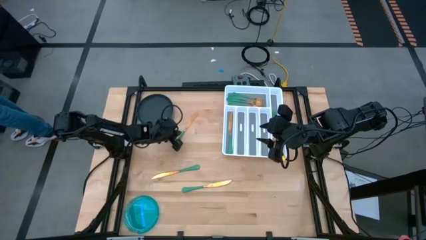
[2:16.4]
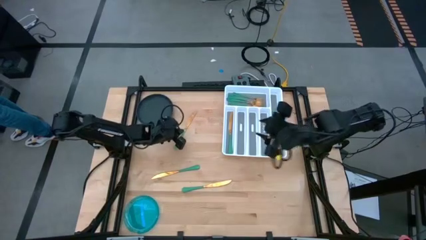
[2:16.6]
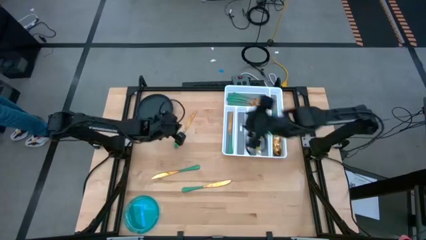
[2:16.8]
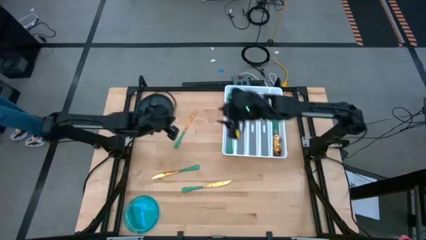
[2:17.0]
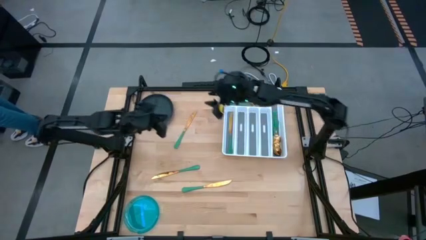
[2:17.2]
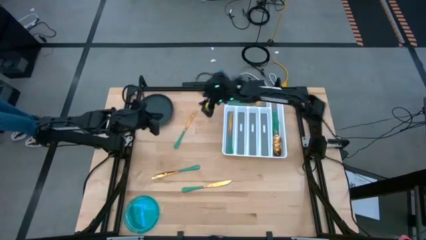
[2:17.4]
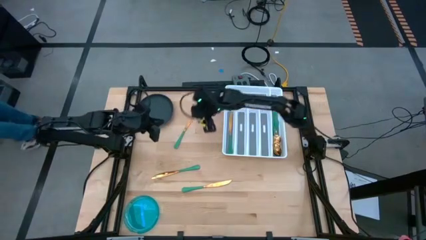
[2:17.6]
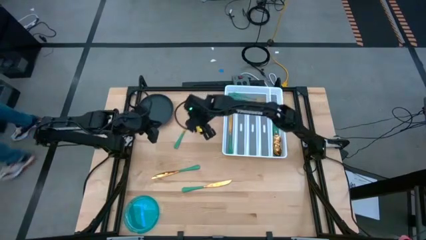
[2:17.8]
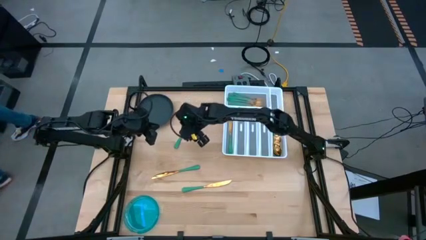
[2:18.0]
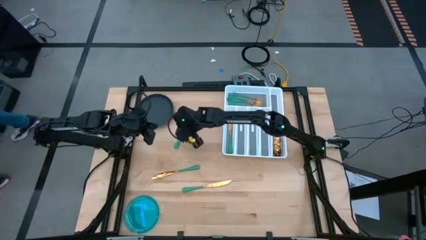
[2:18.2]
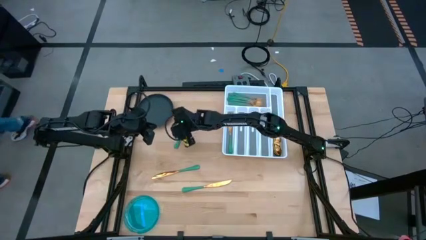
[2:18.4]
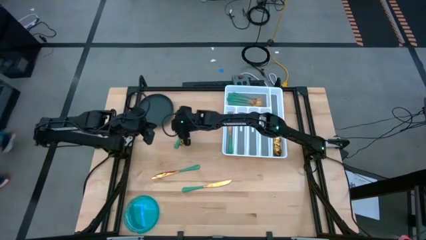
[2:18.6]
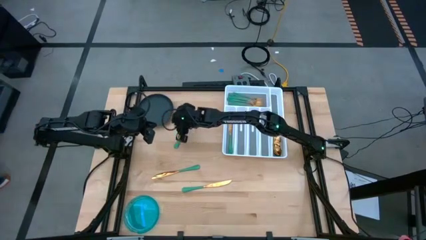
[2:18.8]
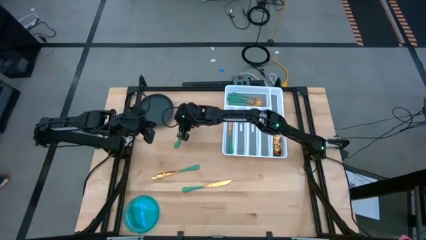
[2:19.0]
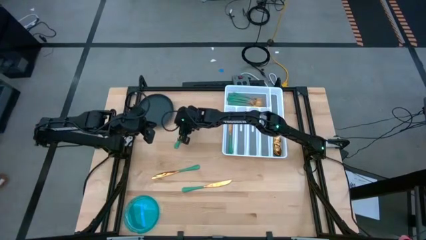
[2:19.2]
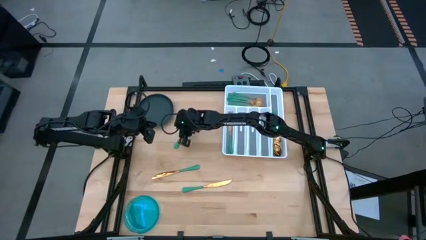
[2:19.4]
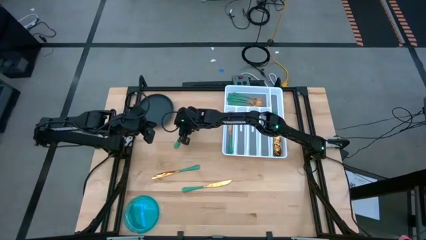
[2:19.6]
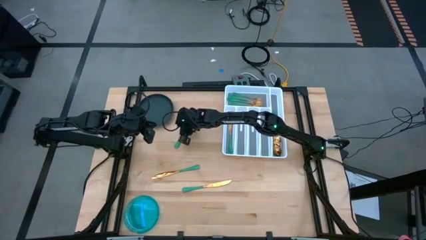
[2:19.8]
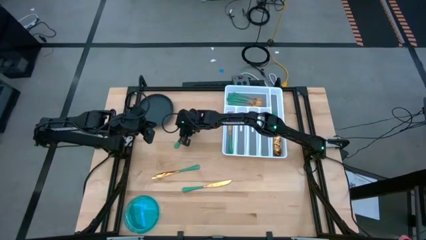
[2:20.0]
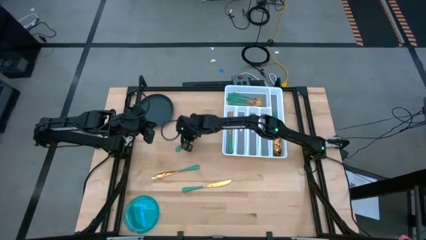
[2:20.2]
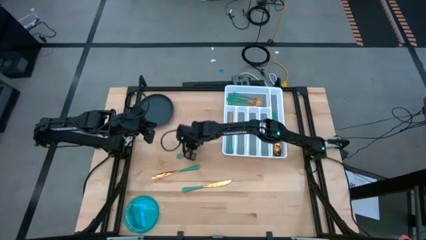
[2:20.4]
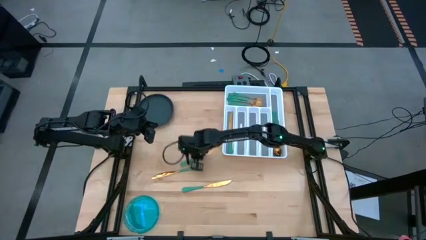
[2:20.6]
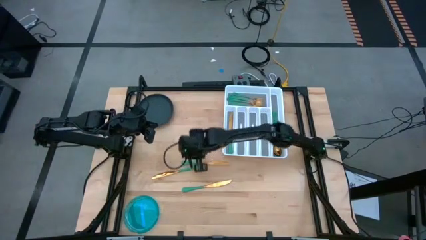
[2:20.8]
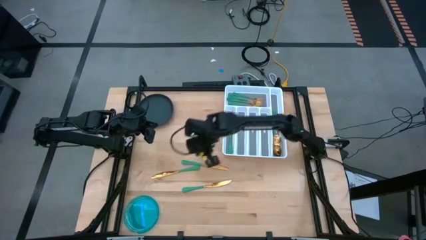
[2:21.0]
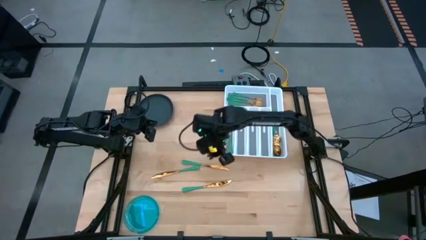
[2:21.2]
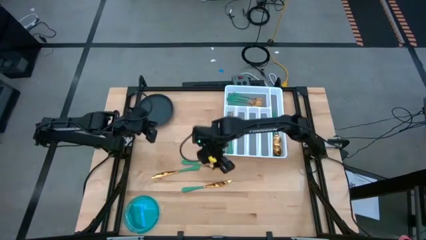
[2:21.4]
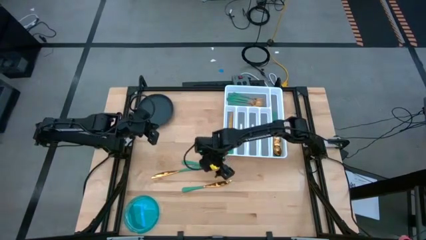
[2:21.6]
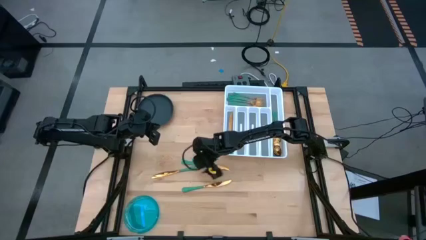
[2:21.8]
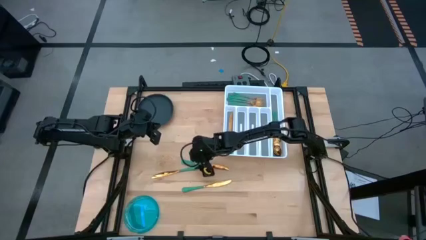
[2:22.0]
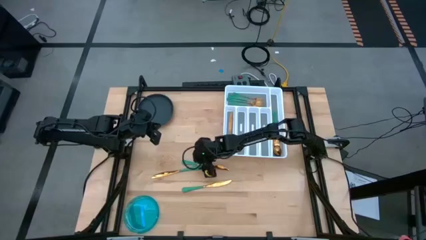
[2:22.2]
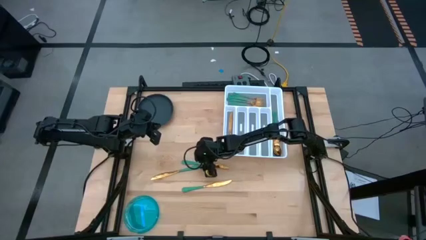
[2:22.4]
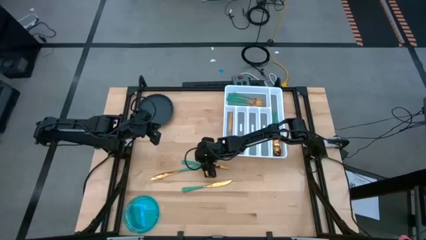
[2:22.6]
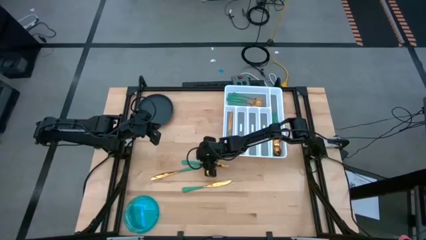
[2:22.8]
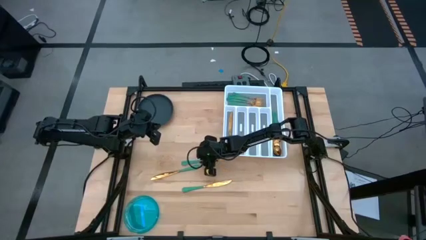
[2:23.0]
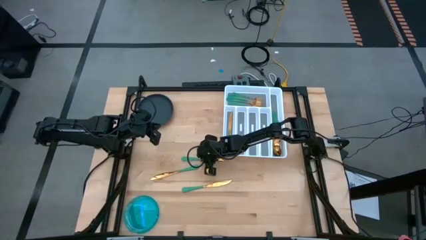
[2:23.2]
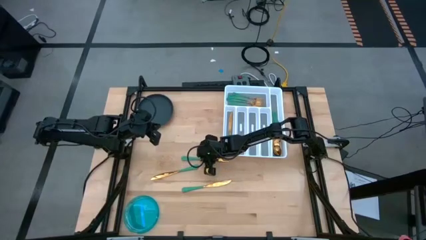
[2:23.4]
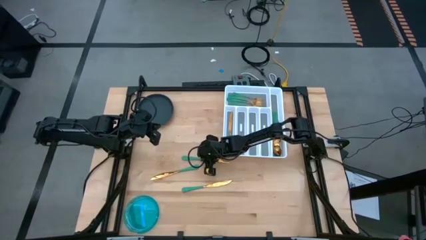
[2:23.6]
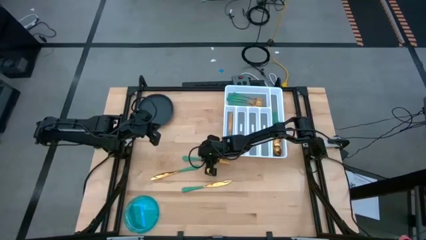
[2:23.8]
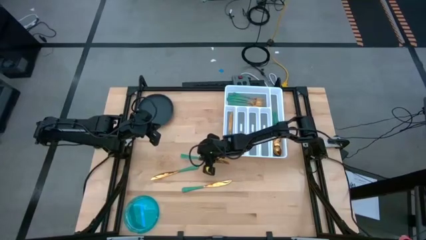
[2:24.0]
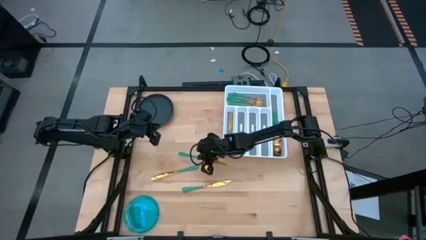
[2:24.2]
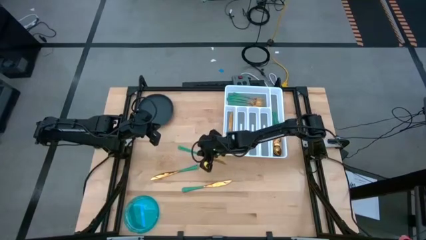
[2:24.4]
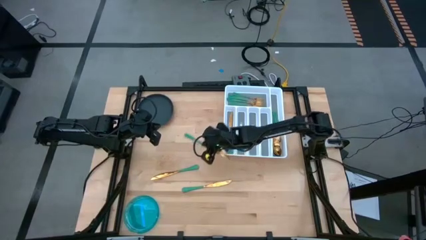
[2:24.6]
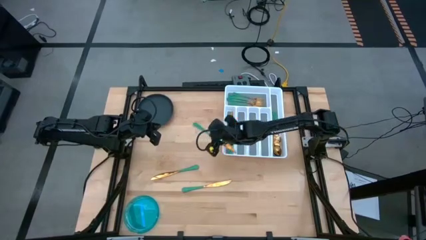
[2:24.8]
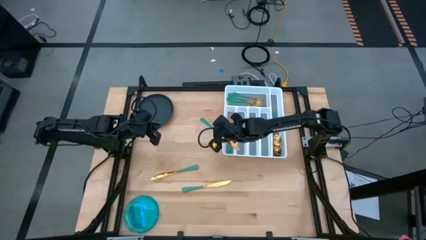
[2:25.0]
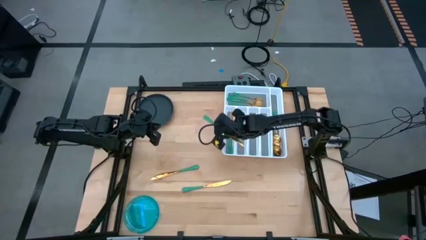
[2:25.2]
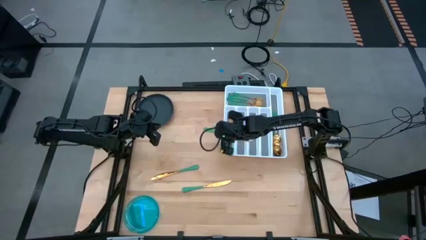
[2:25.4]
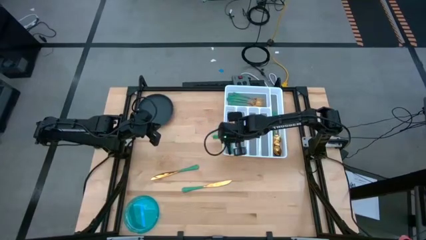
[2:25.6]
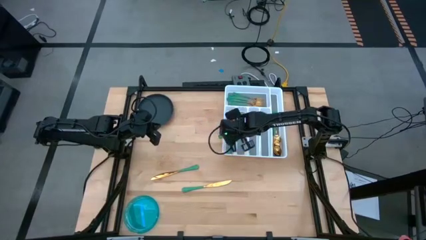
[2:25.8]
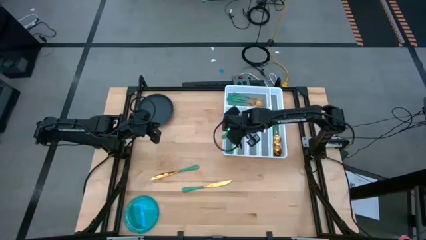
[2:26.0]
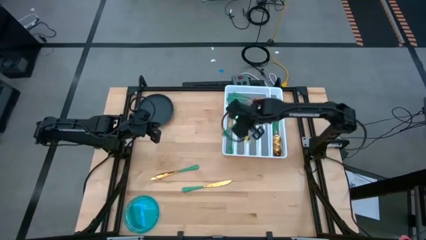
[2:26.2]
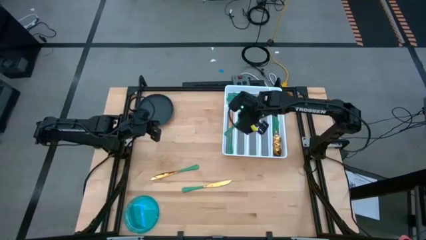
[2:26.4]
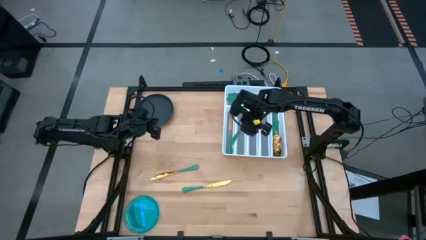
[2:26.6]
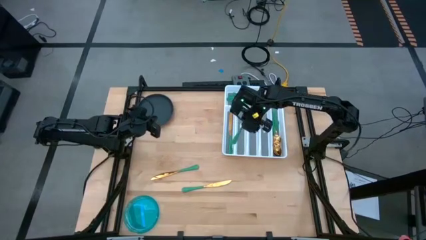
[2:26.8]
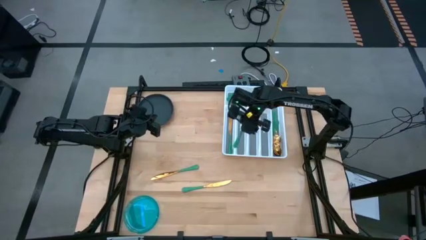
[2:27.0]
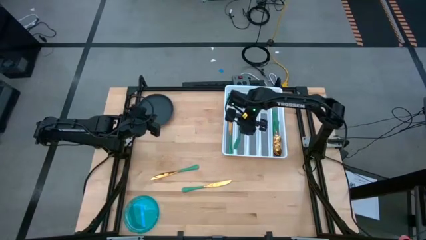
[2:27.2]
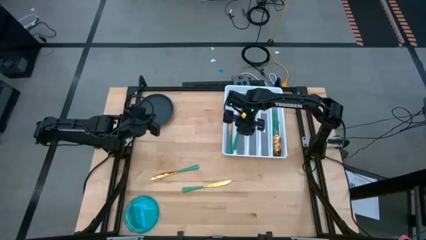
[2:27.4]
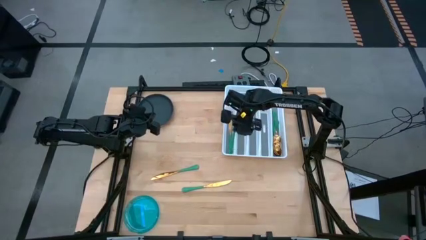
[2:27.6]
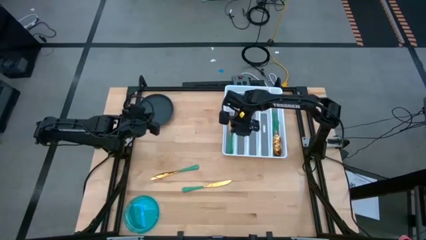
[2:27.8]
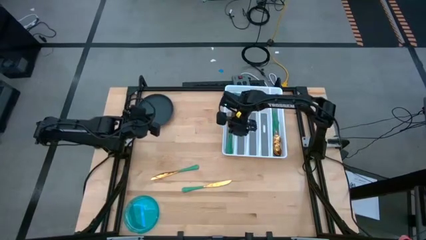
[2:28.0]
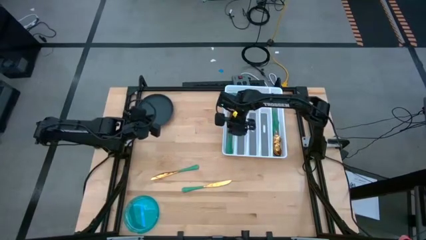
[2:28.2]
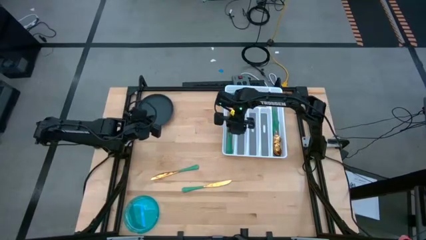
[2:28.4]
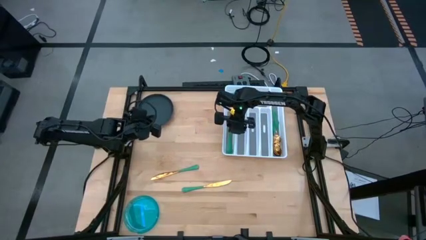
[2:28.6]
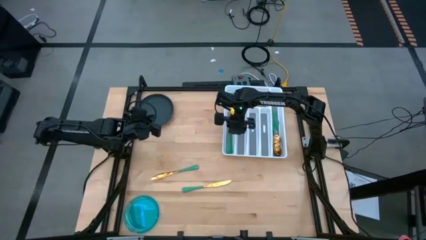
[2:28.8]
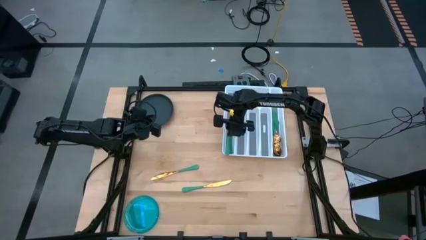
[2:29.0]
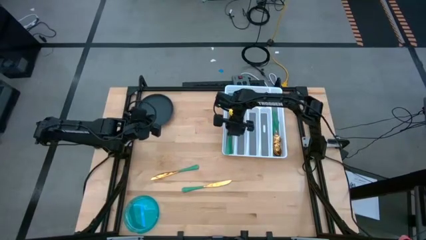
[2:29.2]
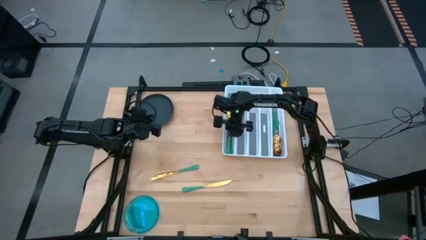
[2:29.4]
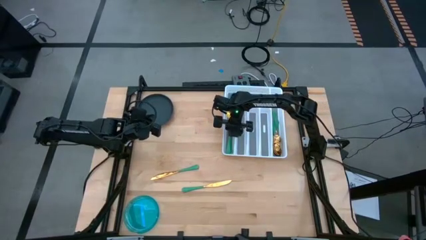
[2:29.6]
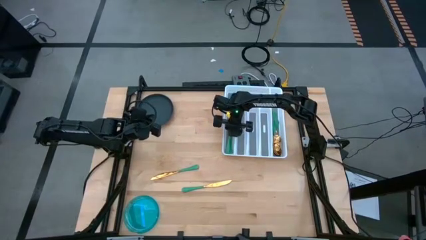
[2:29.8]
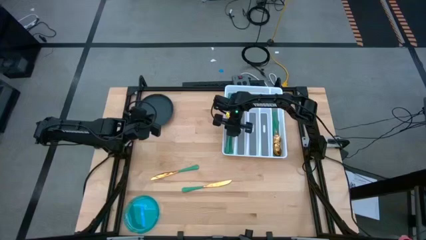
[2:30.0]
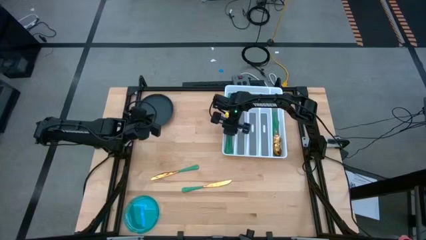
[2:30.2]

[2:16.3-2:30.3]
Task: Sort silverware
Put the green knife into the silverware tray
